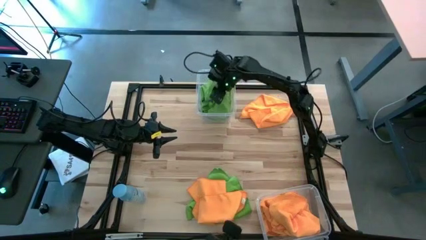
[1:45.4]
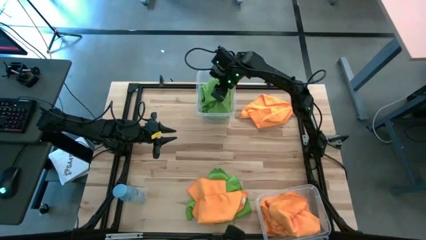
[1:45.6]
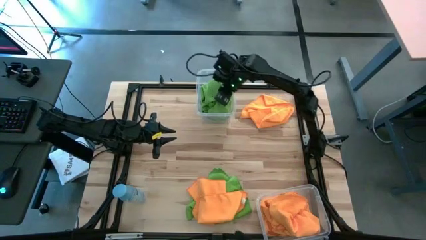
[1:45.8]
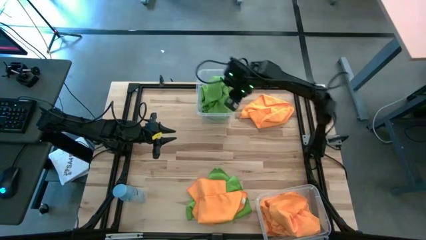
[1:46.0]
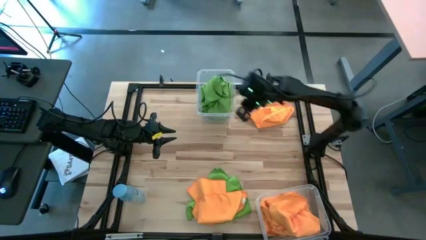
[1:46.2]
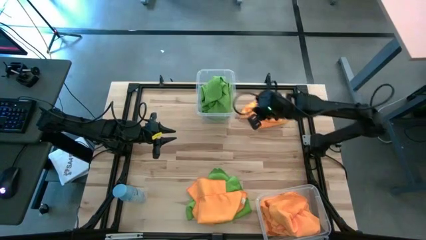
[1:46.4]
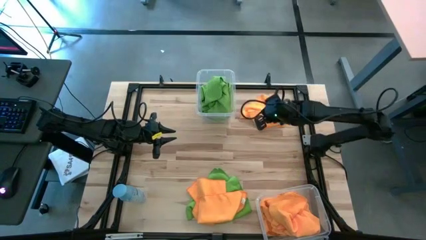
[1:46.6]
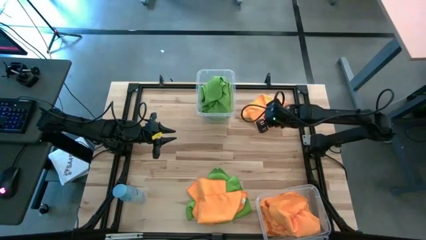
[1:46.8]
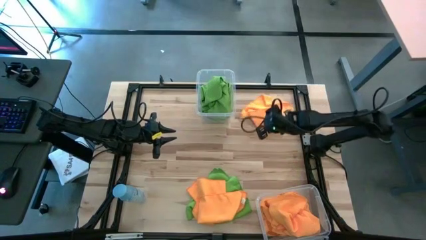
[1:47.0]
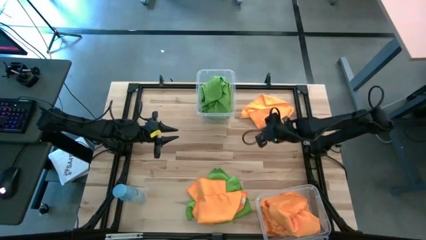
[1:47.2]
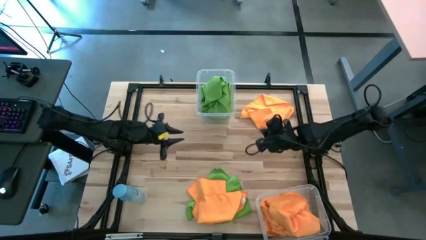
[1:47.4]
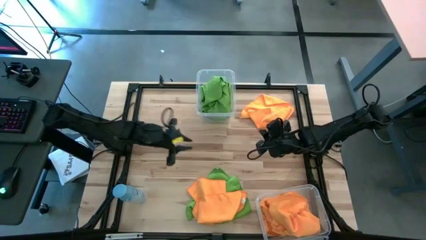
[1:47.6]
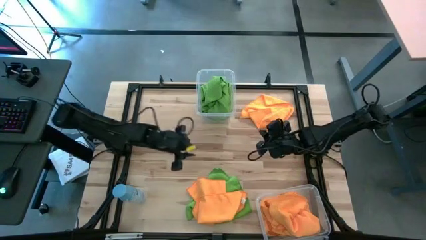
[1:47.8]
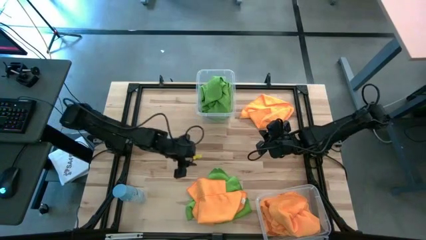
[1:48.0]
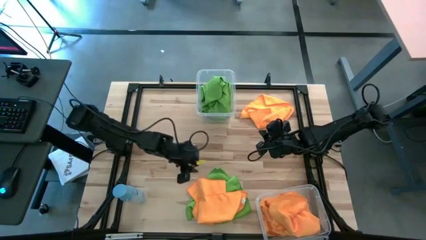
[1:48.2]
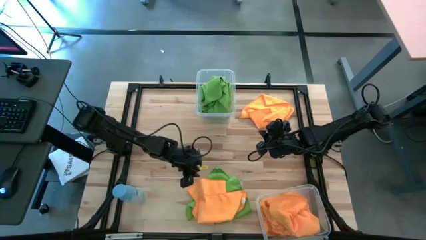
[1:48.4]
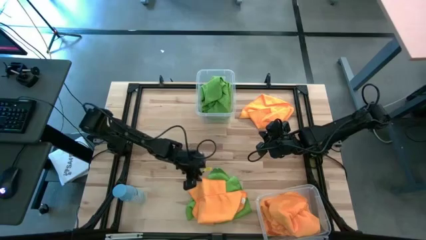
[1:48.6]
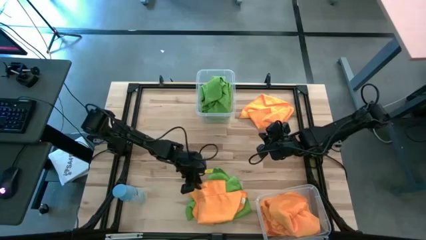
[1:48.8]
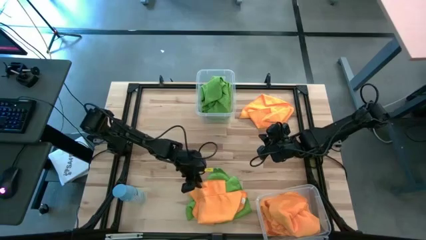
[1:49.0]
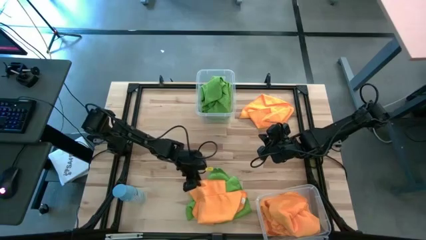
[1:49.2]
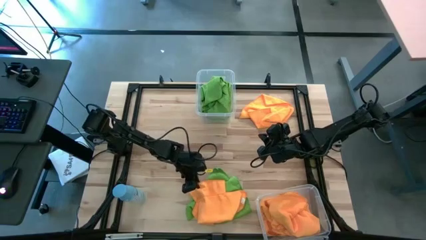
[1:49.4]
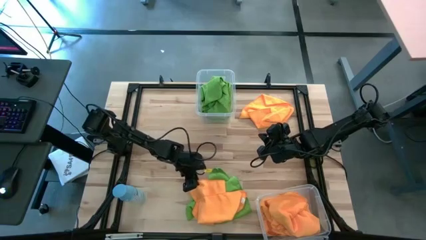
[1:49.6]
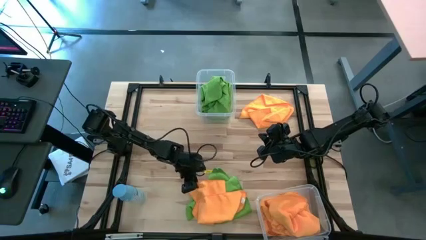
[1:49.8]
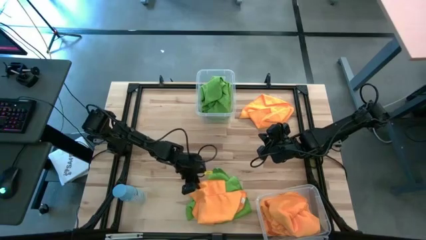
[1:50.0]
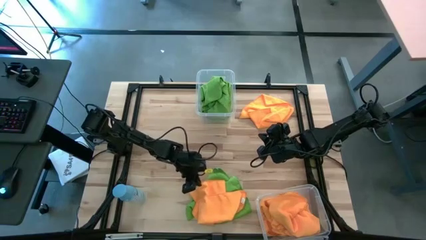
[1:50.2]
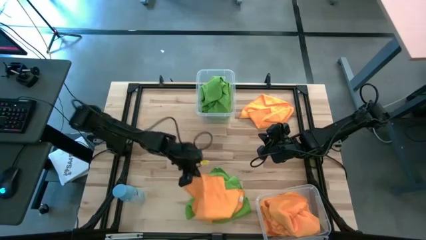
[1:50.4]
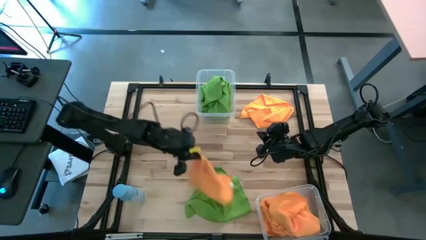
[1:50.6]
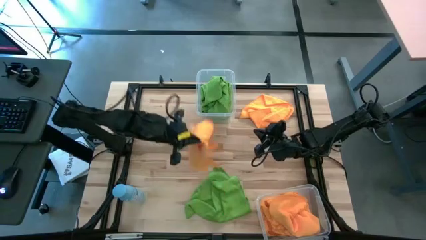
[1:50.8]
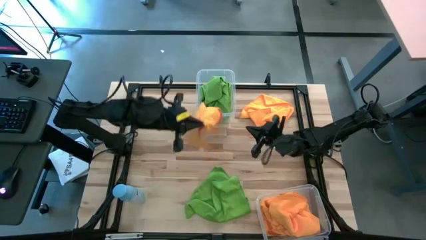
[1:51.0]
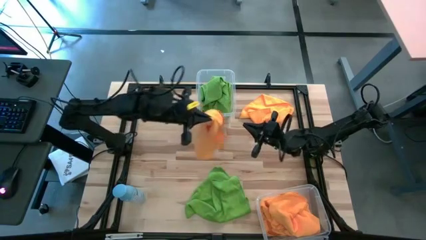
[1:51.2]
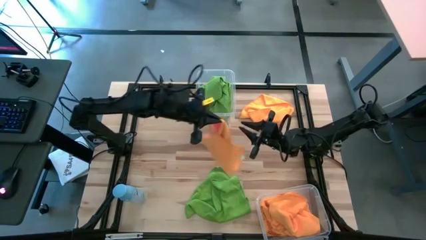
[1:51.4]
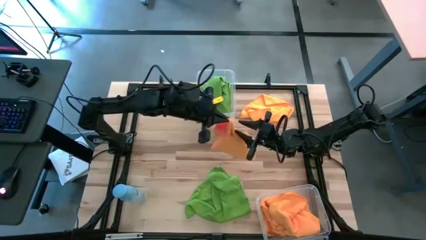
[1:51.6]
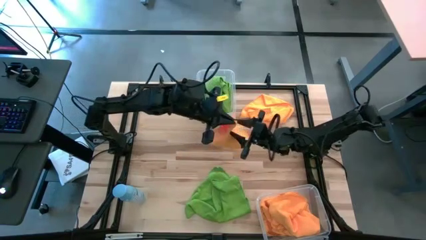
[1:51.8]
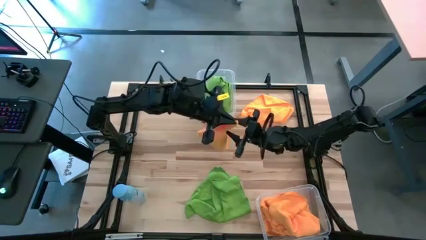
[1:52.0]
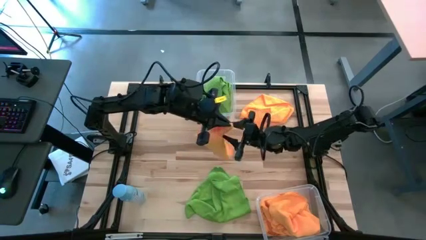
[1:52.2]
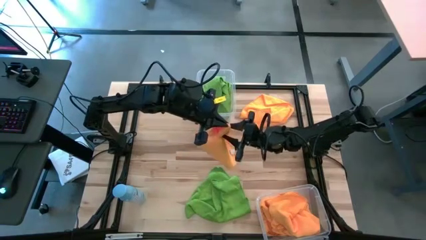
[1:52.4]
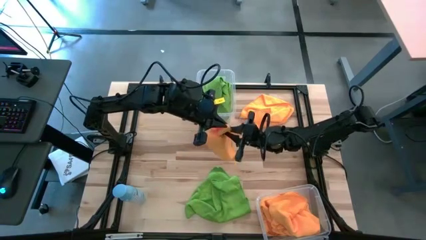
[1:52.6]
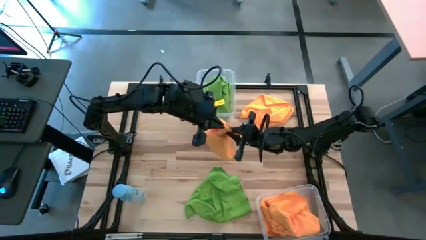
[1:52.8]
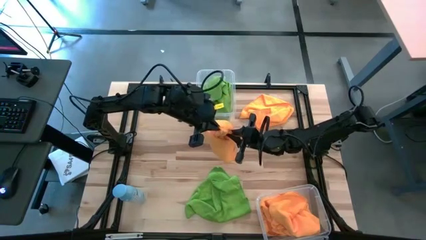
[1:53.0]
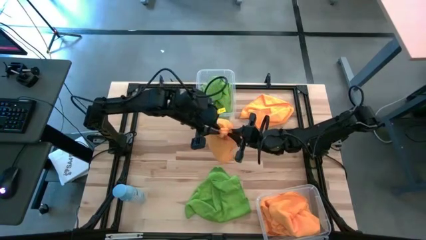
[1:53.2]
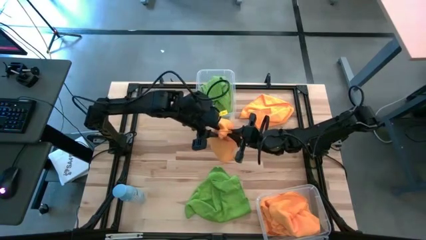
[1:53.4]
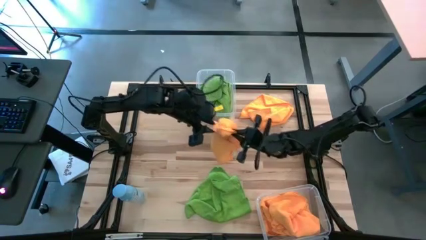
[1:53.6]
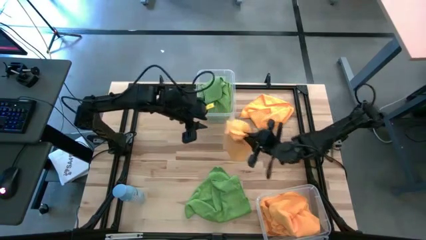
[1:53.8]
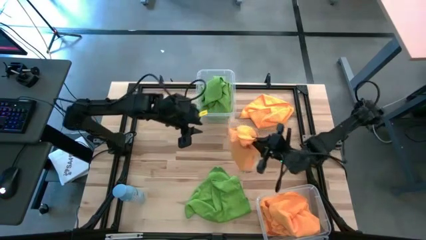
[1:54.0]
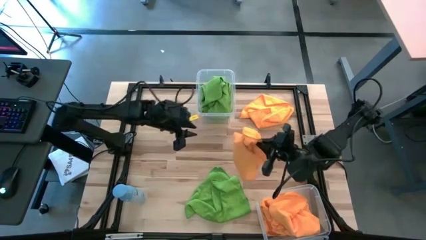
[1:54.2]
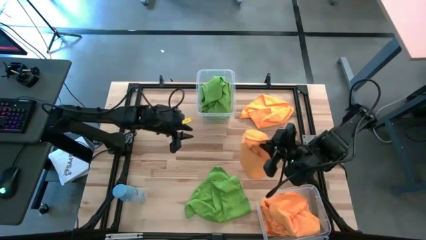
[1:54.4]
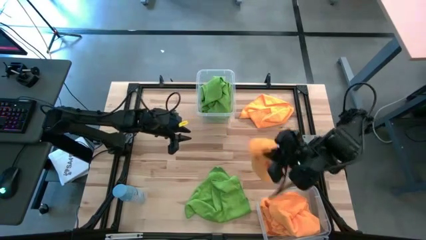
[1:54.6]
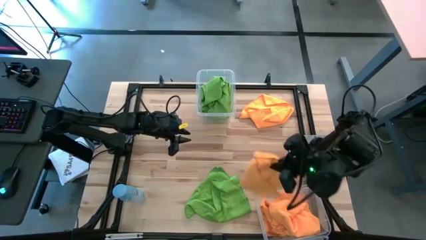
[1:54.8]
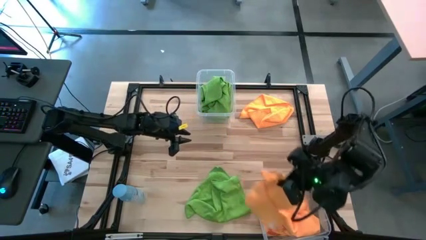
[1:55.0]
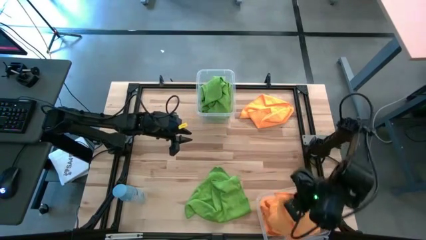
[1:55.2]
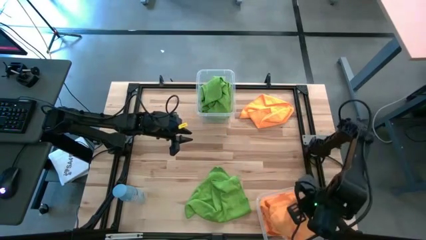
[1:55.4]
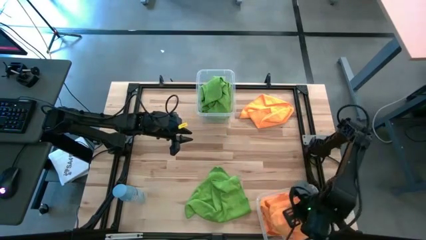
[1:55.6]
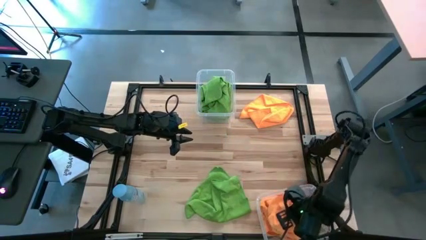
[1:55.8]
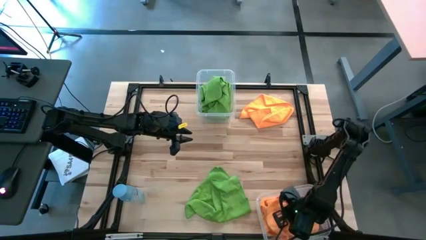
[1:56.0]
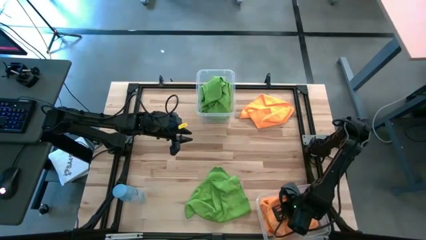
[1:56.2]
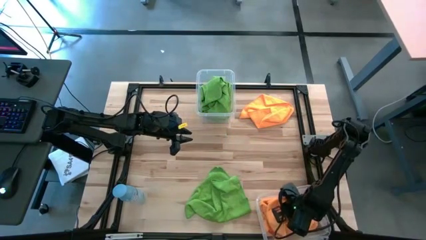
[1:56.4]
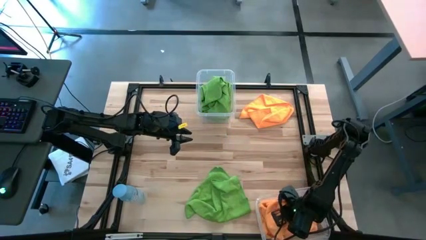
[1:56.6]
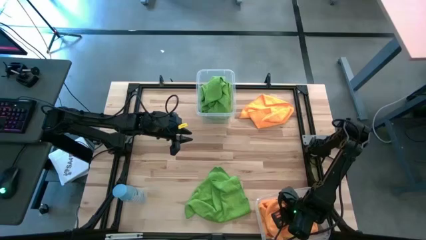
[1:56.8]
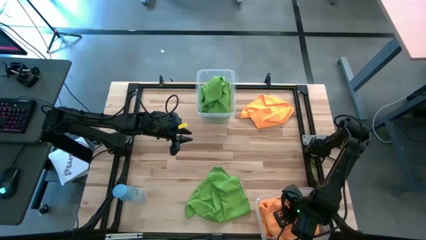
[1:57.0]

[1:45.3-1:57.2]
Task: Sort microfiber towel by color & place in baskets
Put the orange microfiber towel into the bottom transparent bin

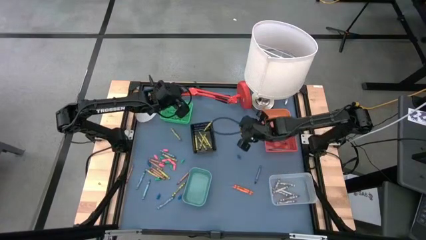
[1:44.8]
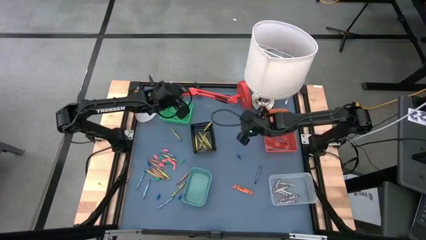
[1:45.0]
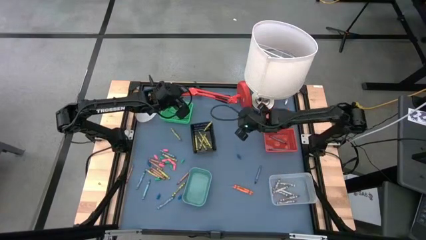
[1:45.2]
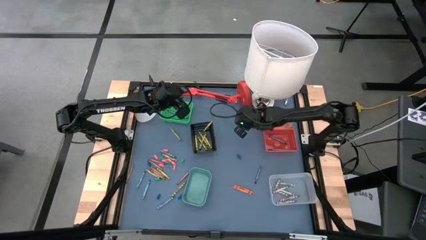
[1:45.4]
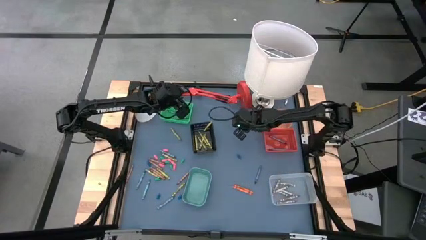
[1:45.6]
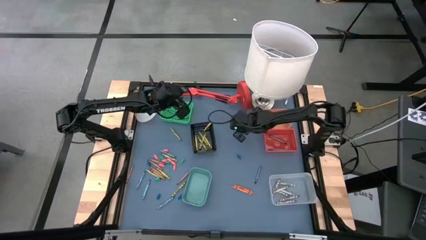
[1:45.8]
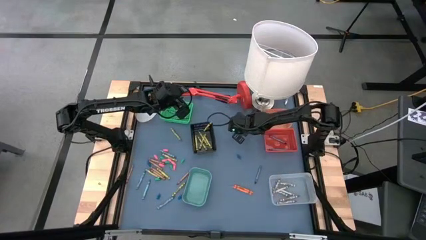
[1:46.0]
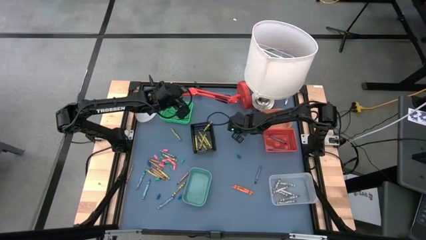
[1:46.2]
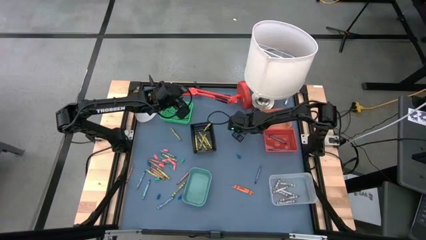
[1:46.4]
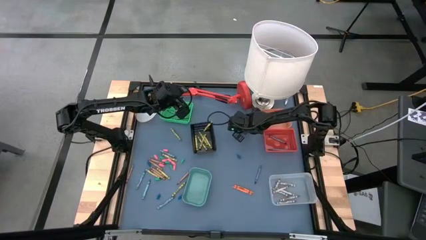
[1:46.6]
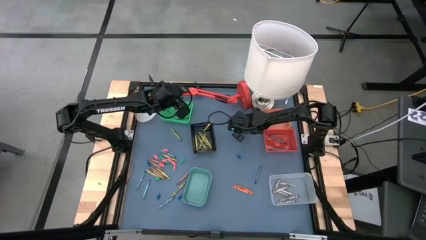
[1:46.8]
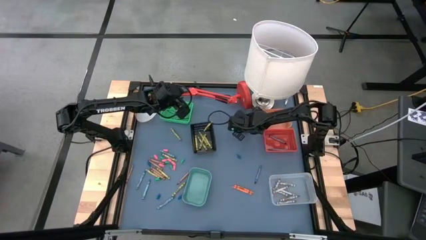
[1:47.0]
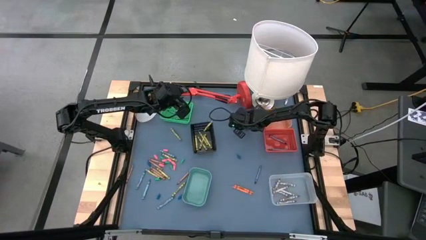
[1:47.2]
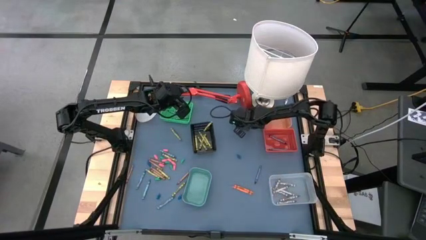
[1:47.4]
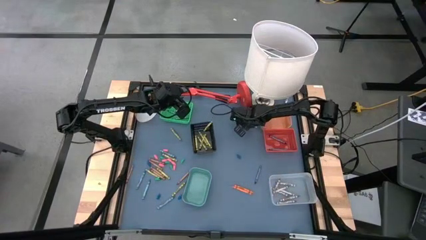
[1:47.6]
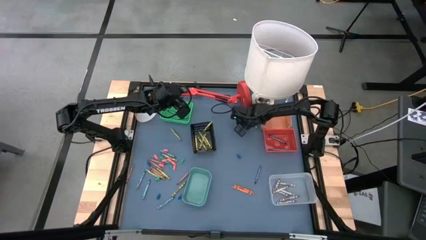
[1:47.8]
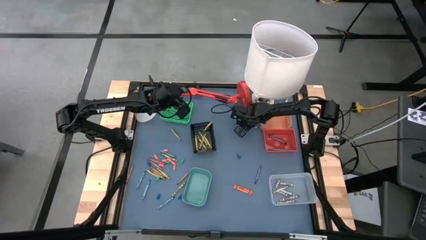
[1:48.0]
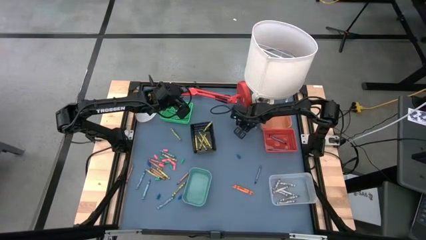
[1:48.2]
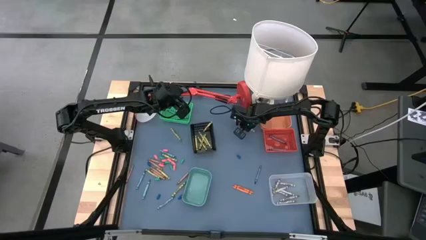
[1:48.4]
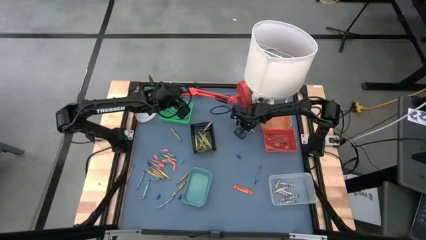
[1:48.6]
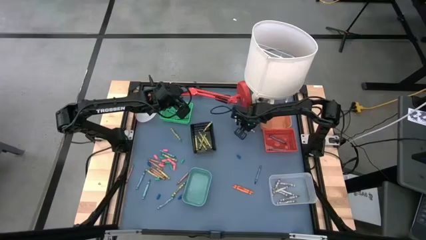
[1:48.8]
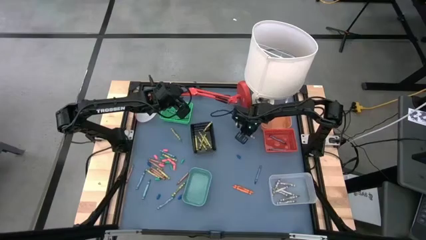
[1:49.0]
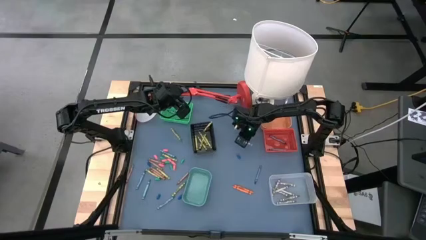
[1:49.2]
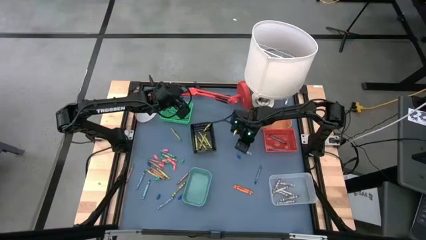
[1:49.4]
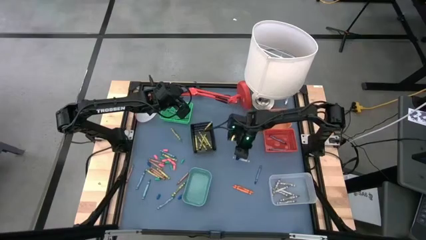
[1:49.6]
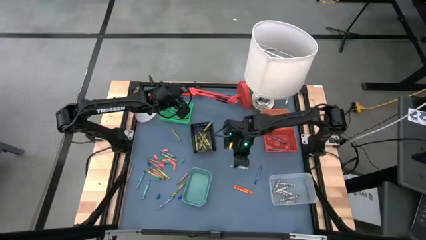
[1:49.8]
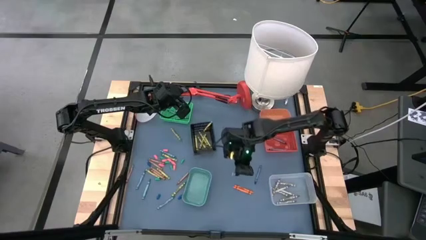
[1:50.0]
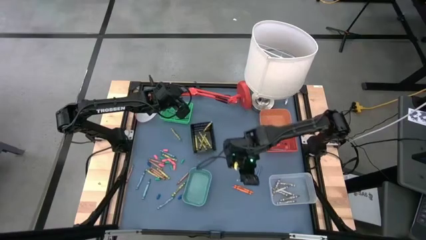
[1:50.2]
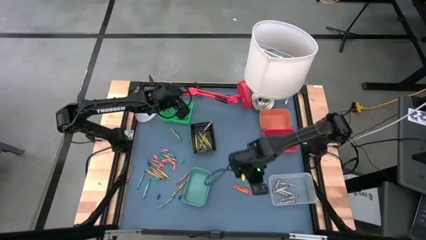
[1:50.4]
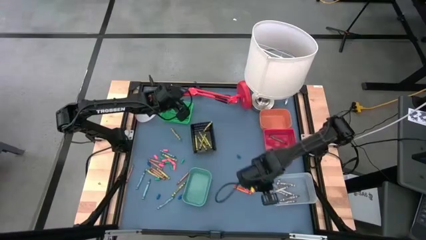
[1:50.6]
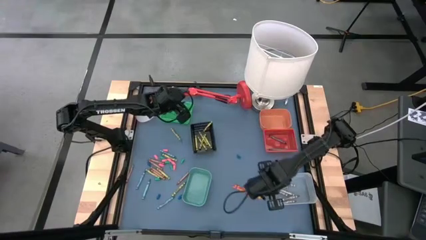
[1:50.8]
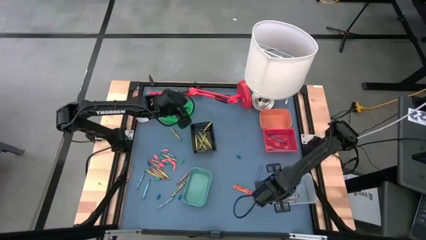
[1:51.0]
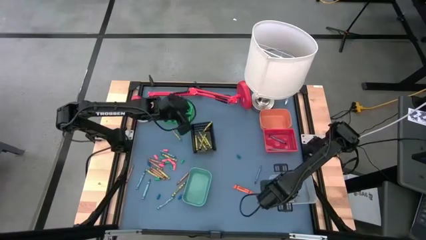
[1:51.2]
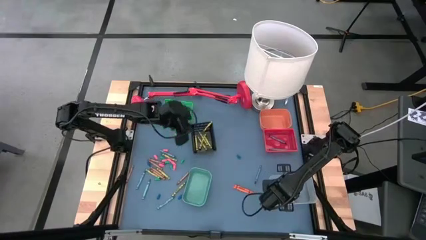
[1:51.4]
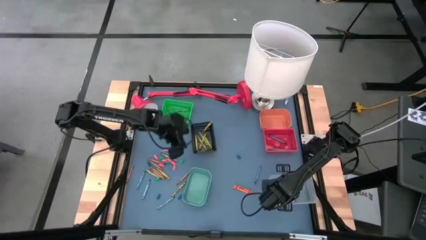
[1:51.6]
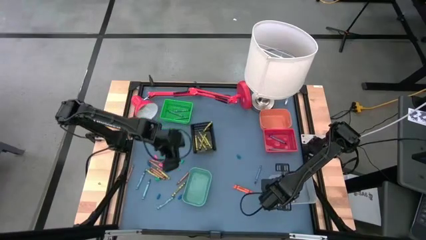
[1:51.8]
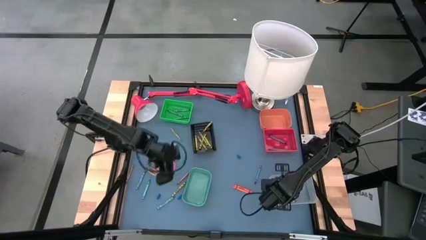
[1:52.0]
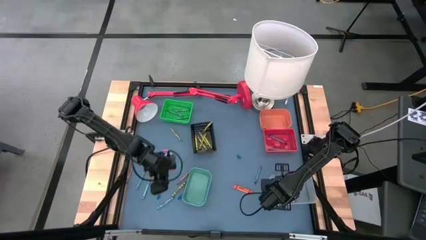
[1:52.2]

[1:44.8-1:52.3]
Task: Sort crayons
Put the gray crayon into the white bin
